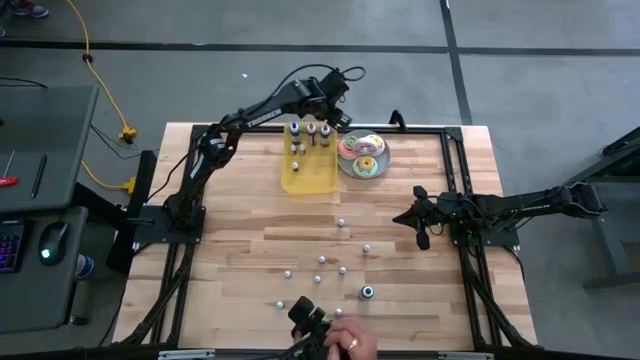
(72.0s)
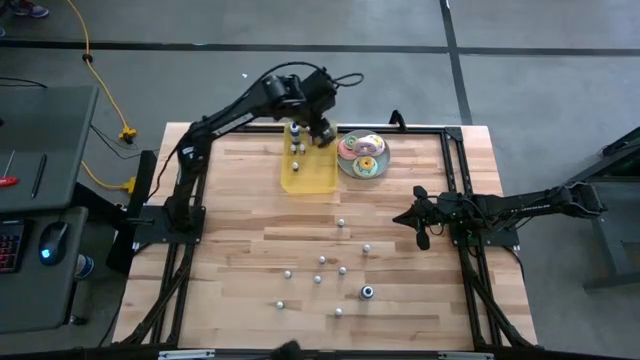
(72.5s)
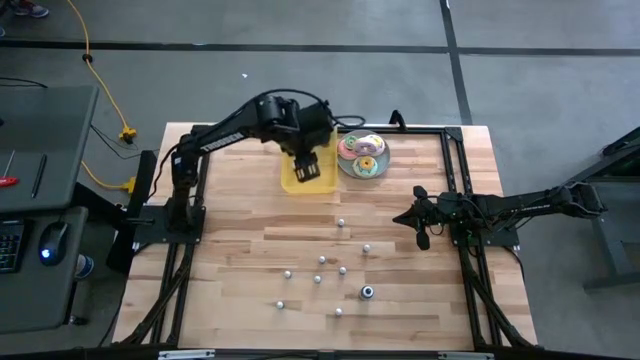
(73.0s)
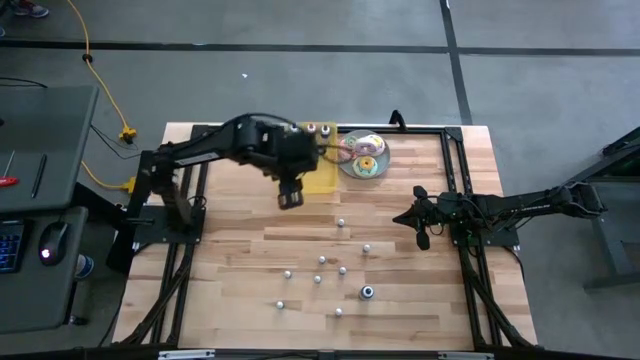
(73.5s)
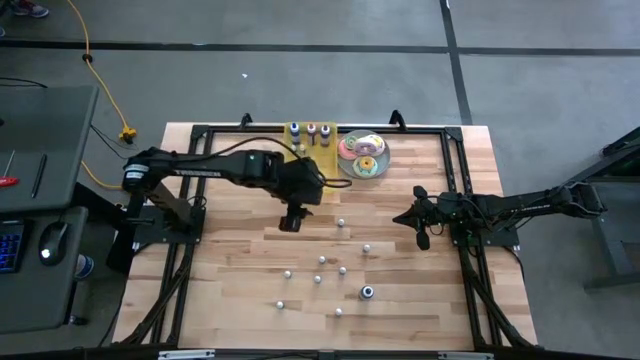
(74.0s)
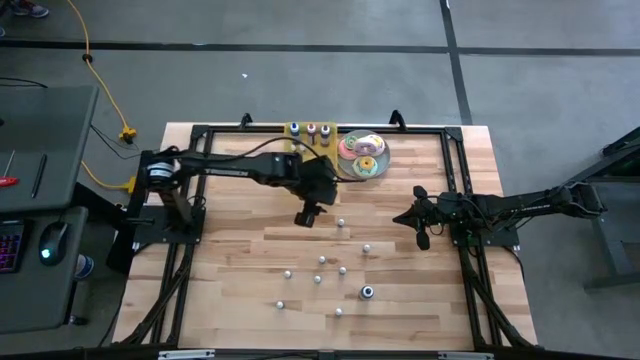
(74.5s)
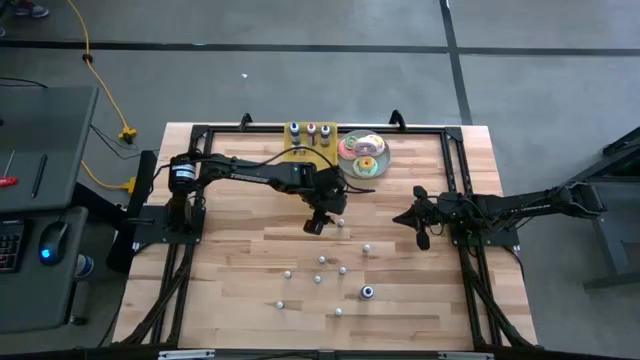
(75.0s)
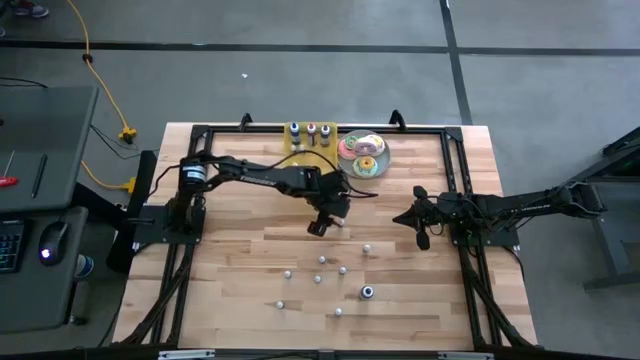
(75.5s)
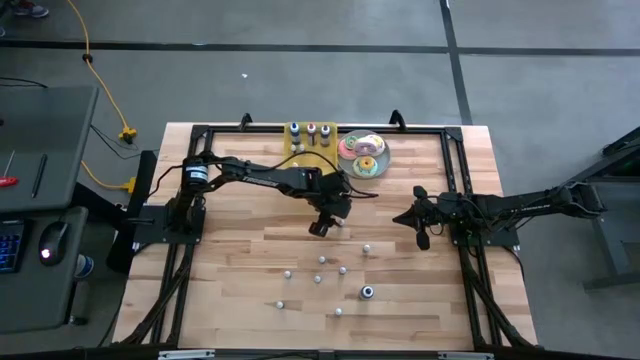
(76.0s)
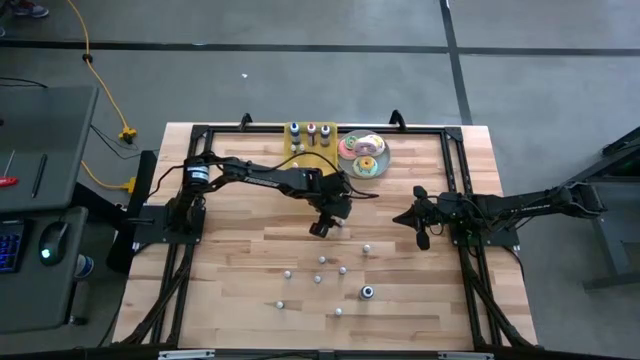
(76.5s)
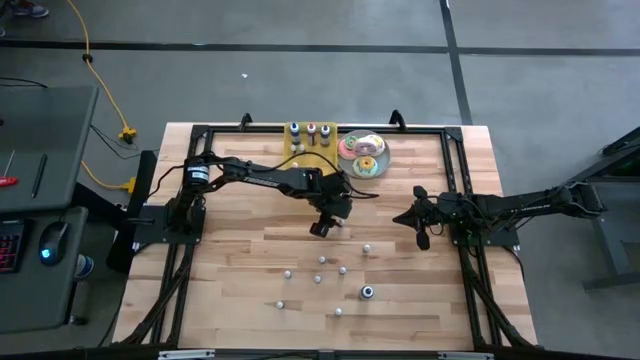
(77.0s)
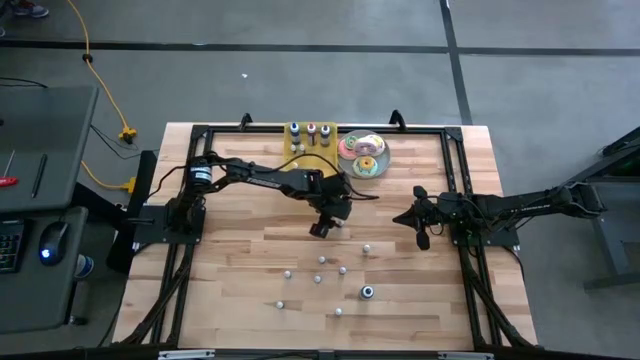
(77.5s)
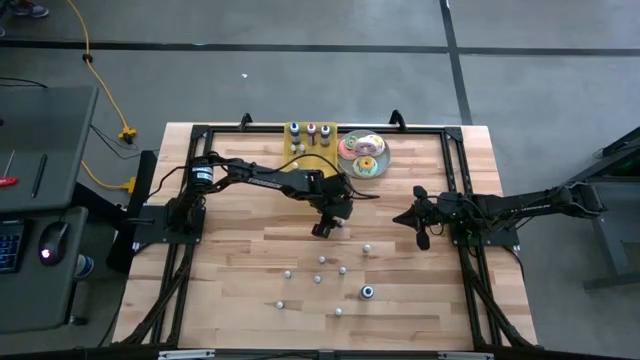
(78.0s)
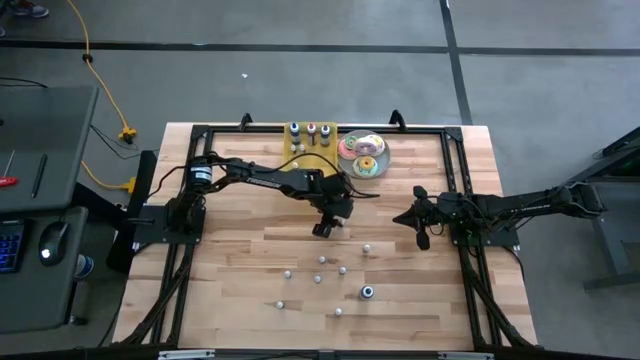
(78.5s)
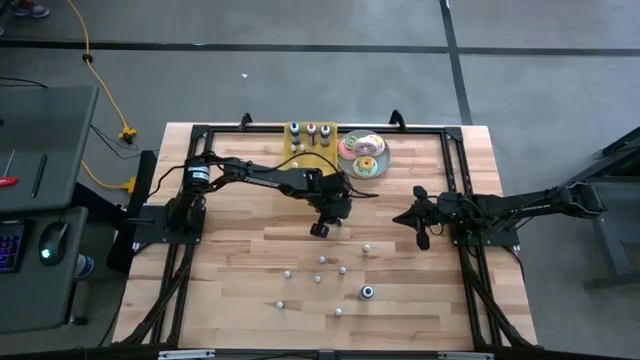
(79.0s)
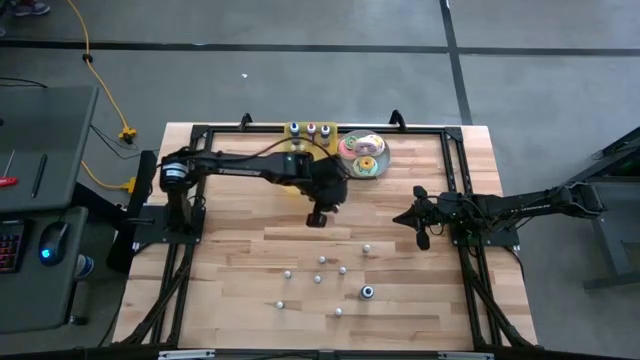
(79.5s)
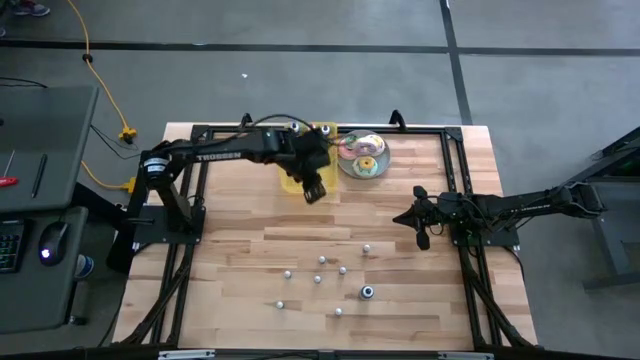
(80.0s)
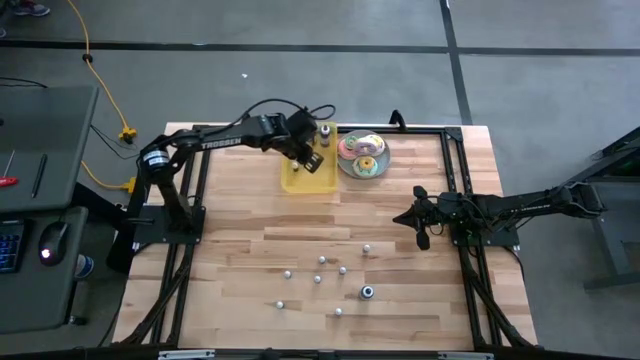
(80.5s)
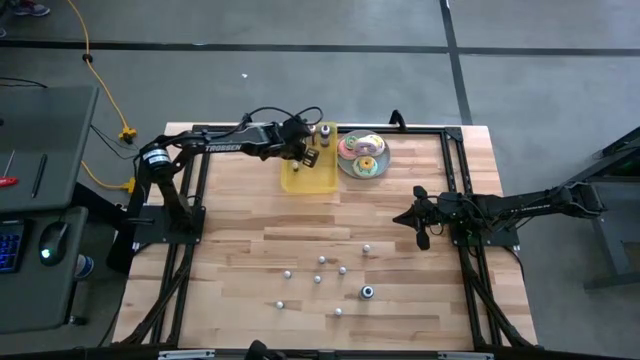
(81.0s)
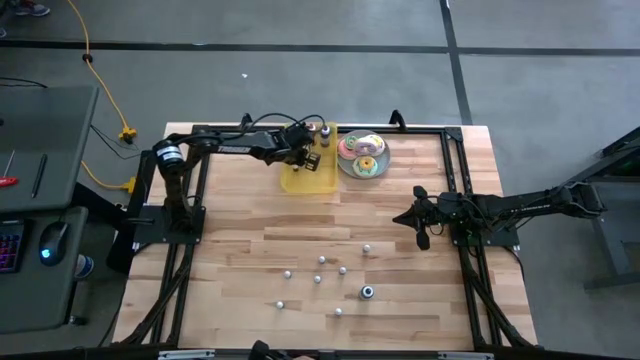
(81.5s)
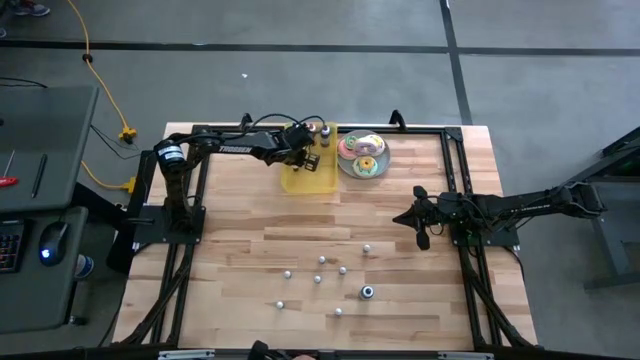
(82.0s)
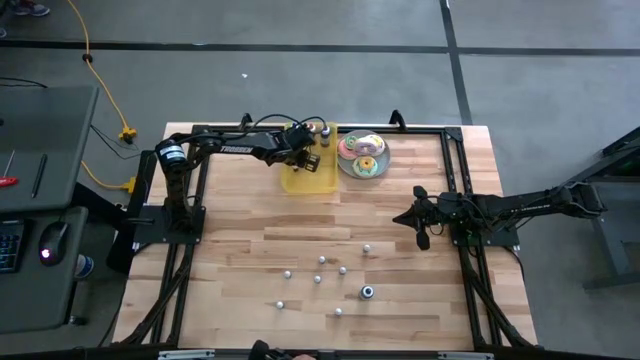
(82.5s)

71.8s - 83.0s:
Task: Pick & Place food coloring
Put the small black food coloring bottle into the bin

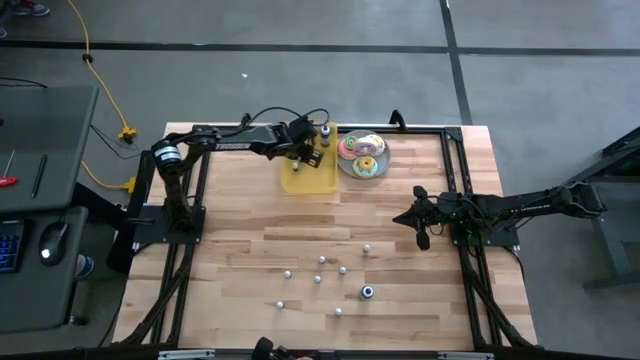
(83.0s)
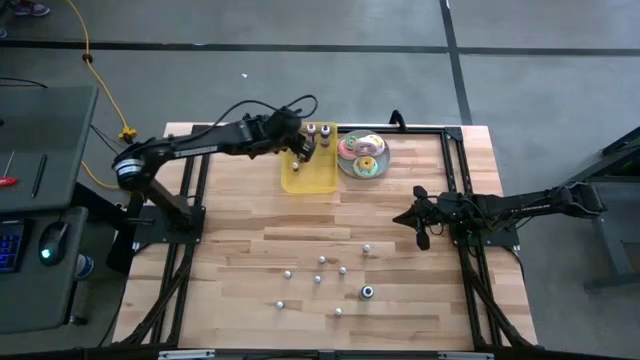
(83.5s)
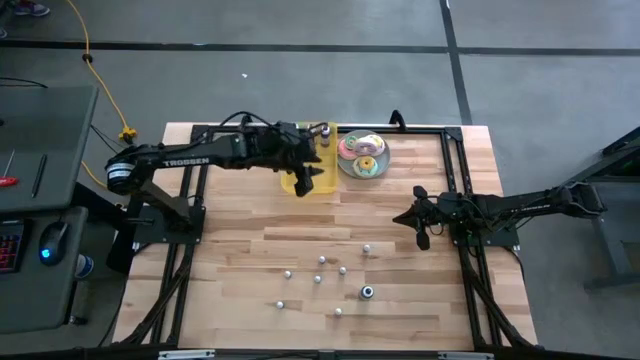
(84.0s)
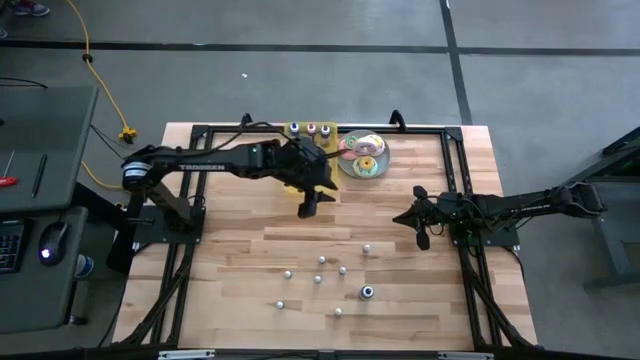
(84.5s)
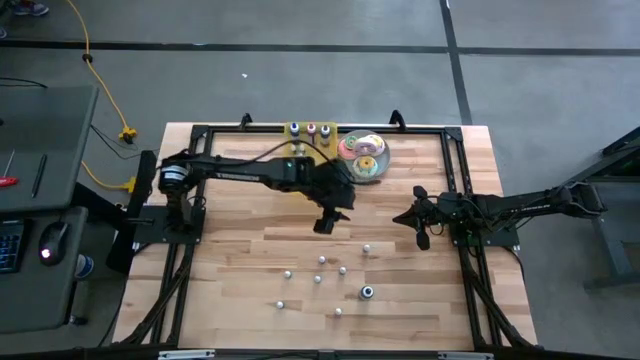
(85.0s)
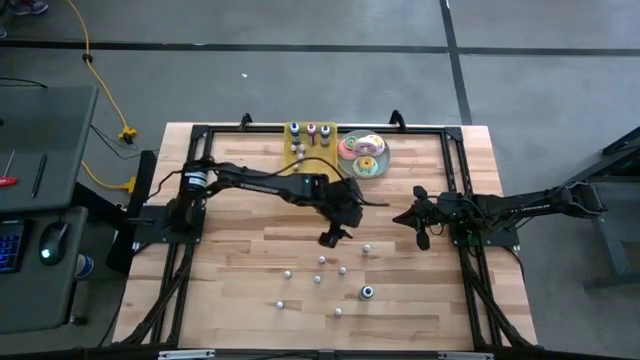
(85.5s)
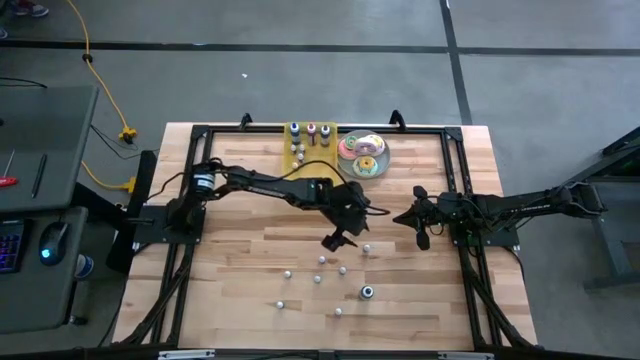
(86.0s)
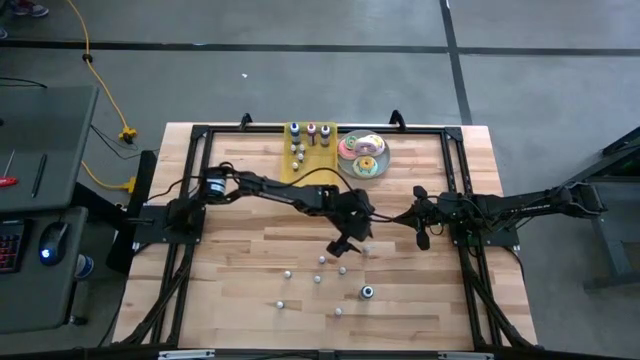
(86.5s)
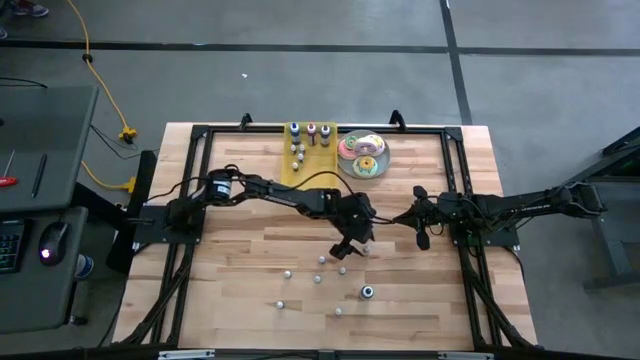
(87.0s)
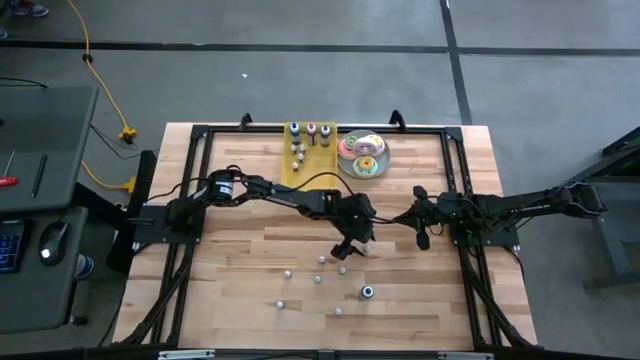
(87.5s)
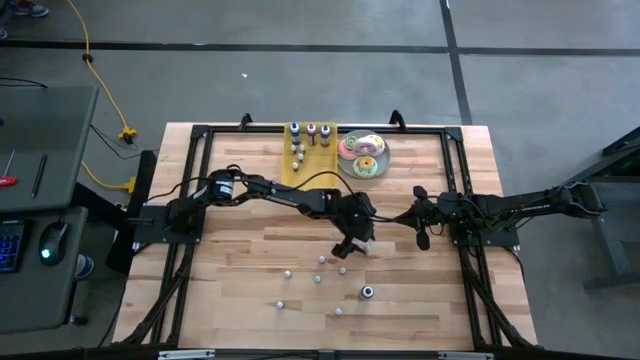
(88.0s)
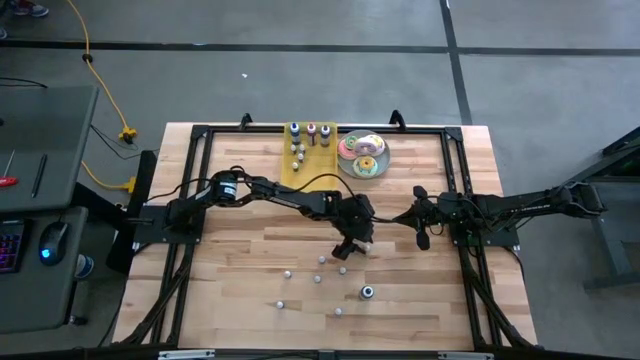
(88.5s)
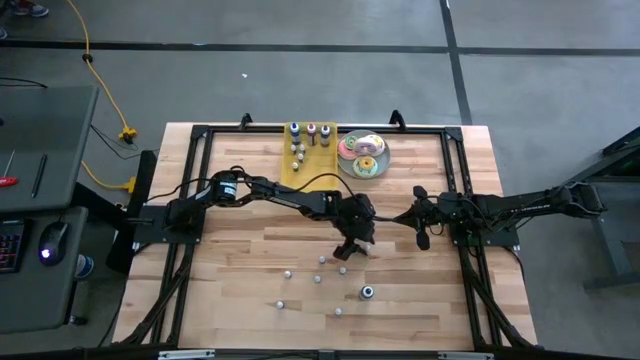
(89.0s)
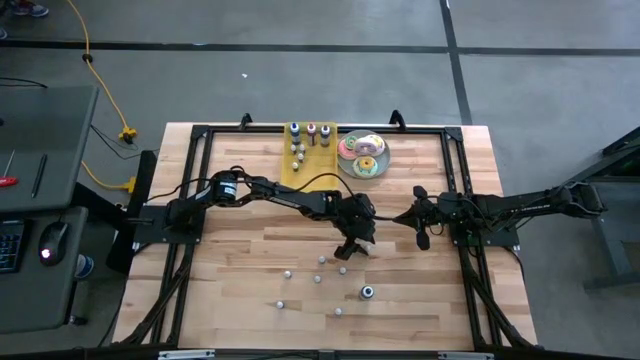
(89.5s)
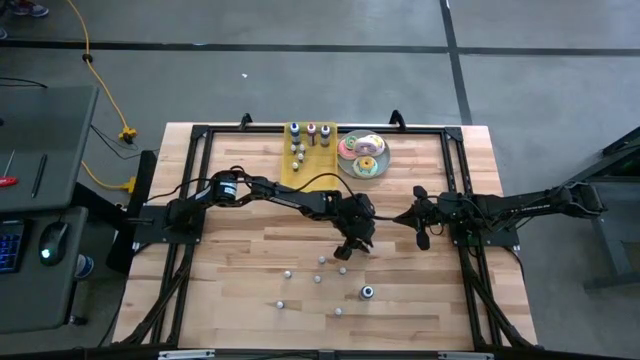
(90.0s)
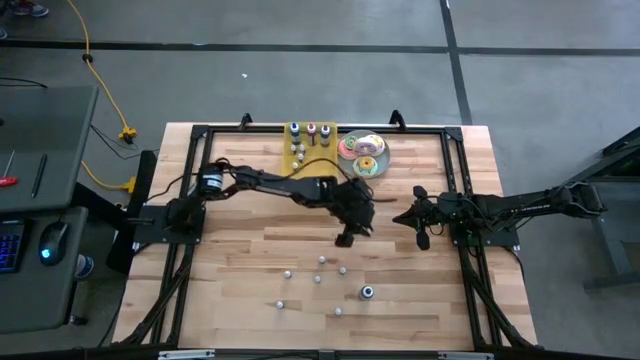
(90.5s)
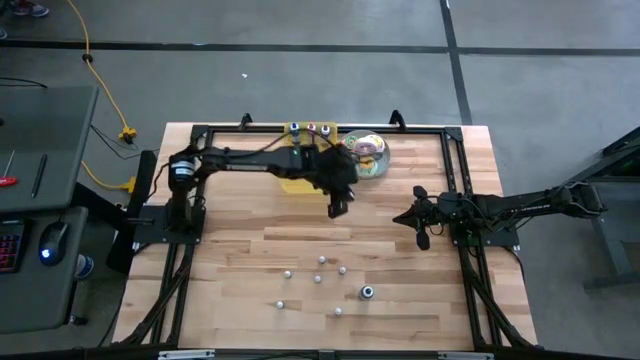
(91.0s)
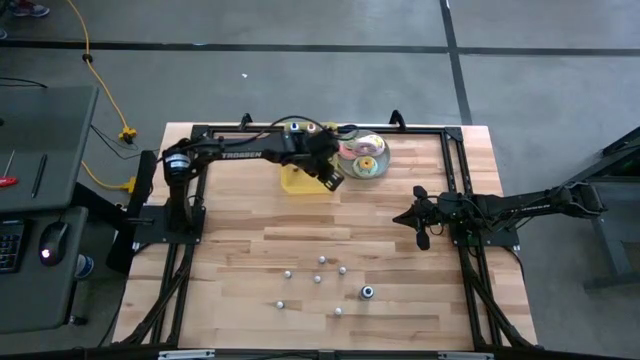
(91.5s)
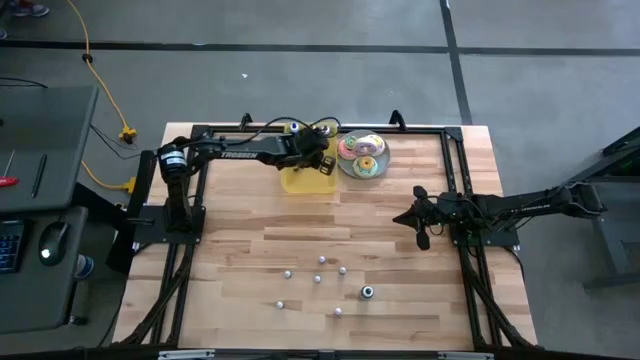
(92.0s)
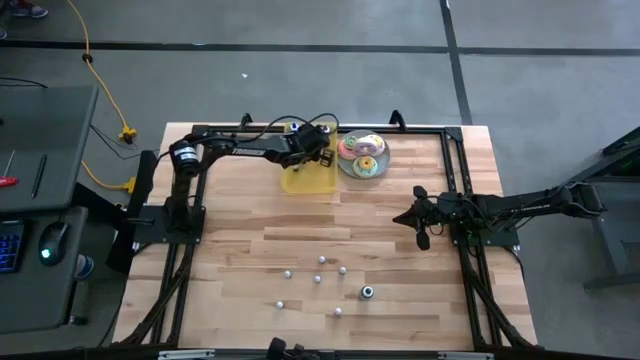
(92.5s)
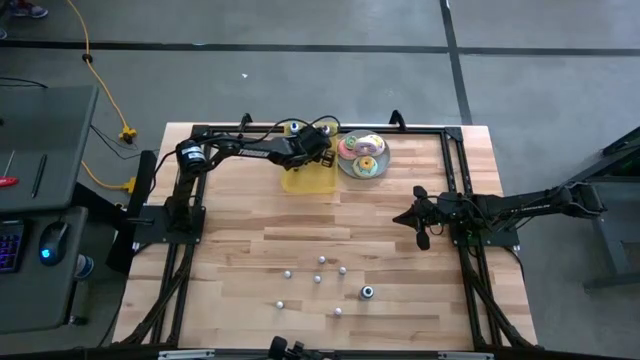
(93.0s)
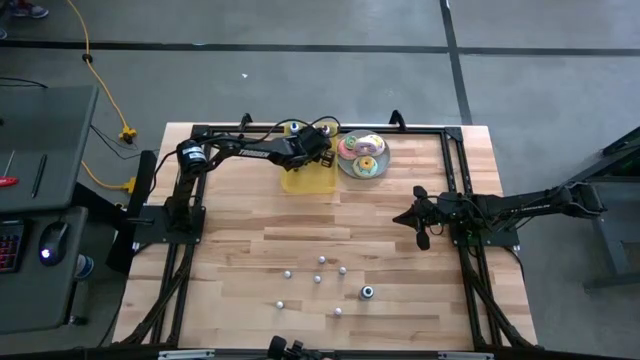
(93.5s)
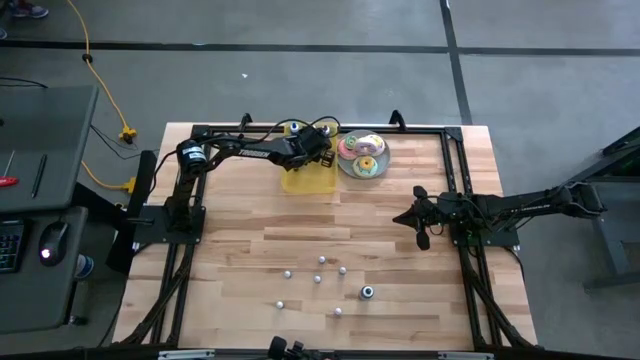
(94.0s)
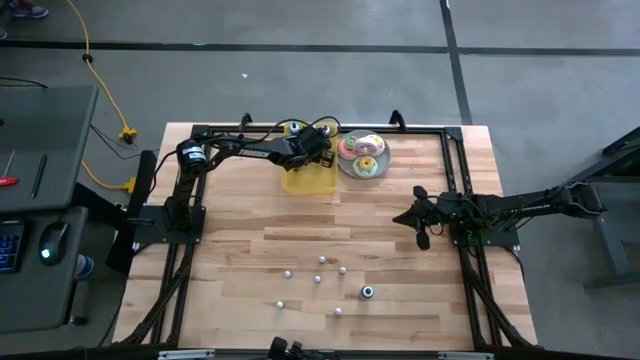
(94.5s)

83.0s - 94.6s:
Put the small black food coloring bottle into the bin
